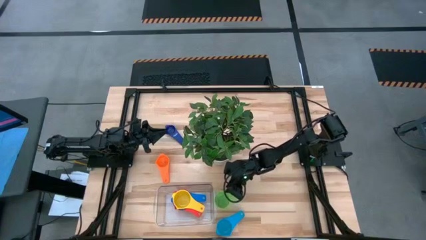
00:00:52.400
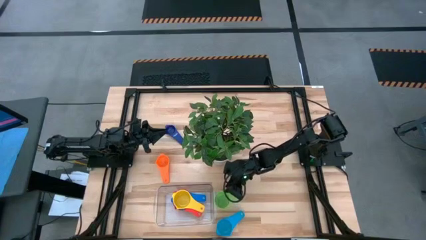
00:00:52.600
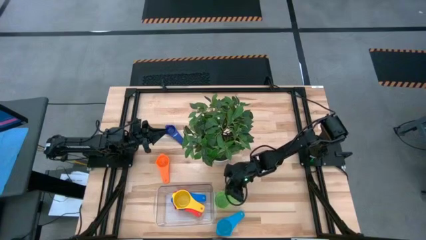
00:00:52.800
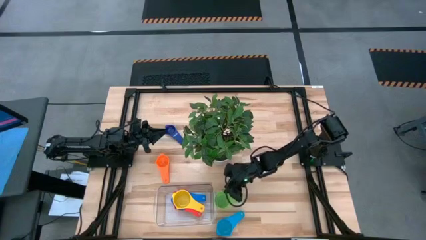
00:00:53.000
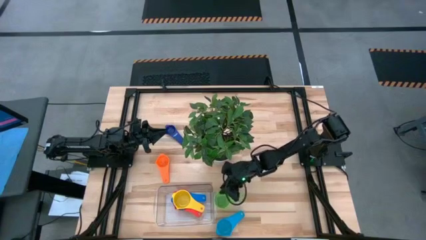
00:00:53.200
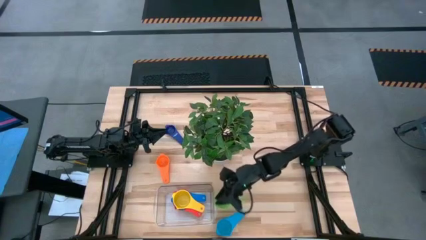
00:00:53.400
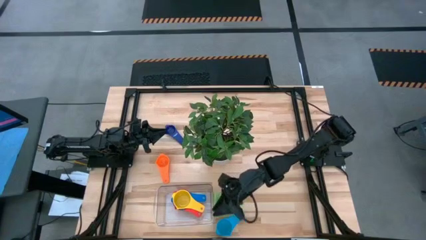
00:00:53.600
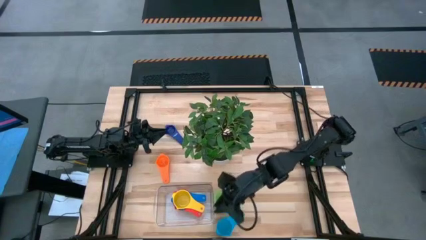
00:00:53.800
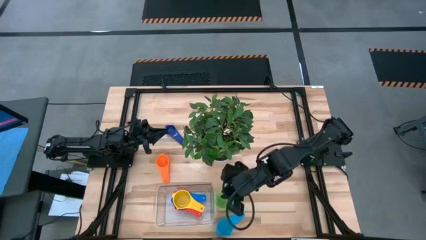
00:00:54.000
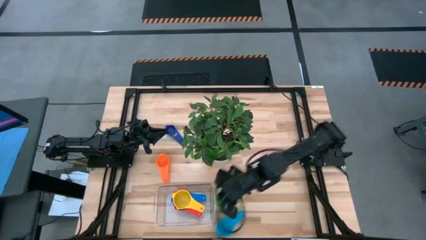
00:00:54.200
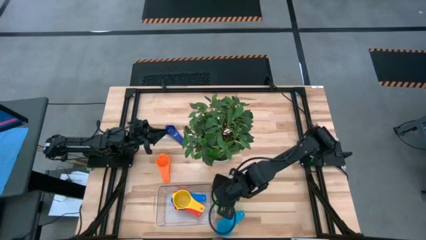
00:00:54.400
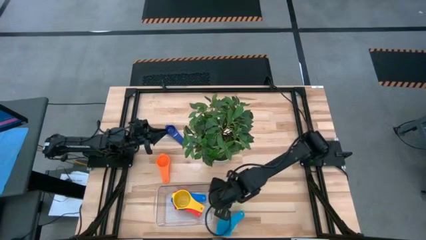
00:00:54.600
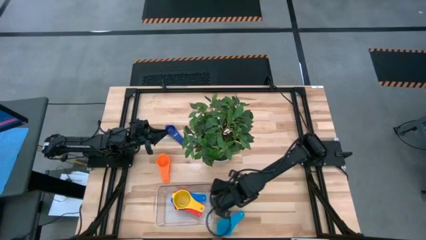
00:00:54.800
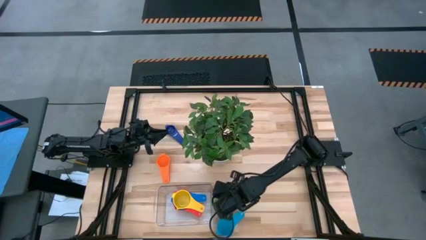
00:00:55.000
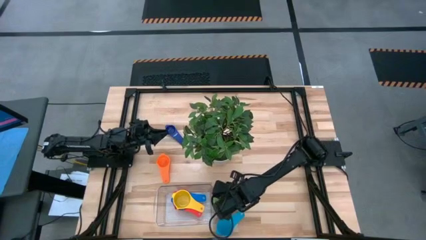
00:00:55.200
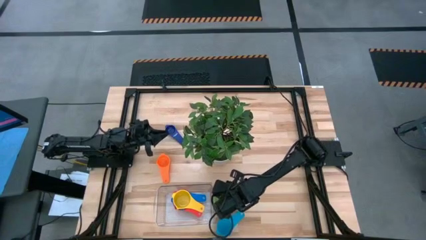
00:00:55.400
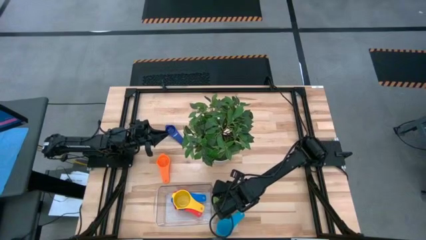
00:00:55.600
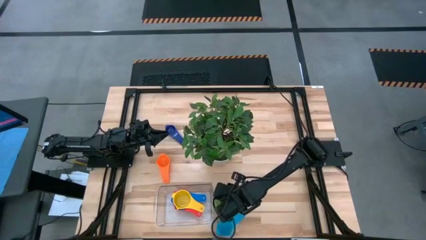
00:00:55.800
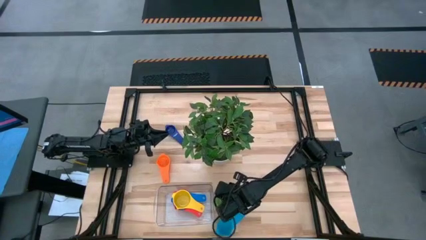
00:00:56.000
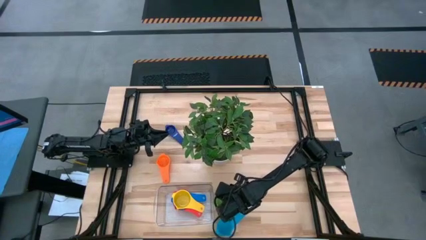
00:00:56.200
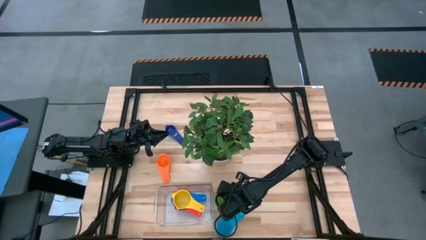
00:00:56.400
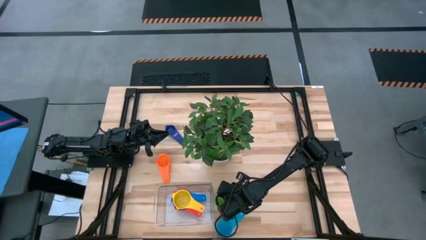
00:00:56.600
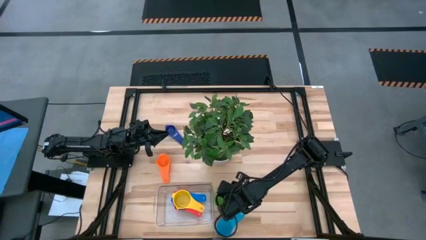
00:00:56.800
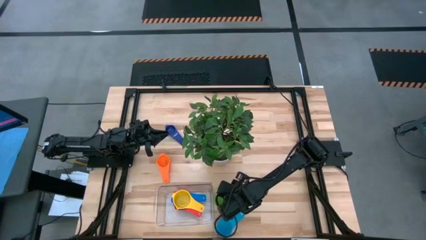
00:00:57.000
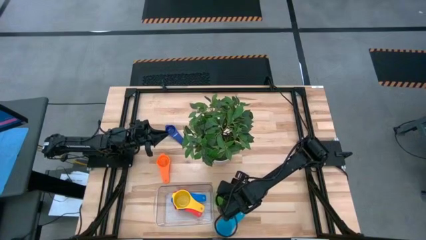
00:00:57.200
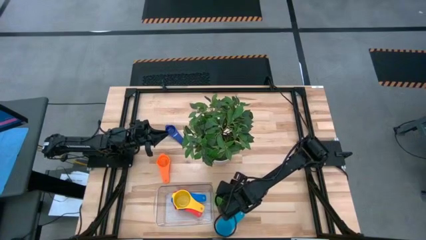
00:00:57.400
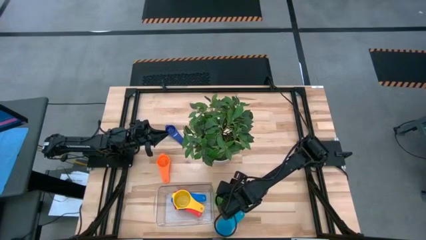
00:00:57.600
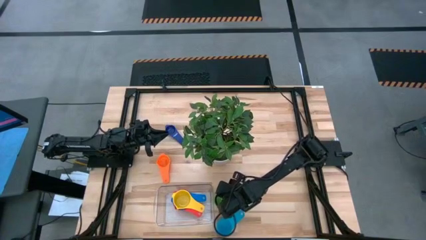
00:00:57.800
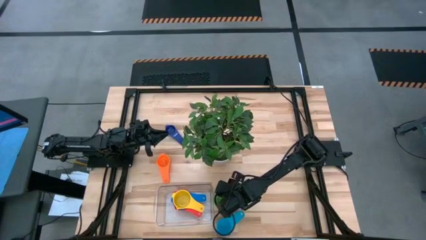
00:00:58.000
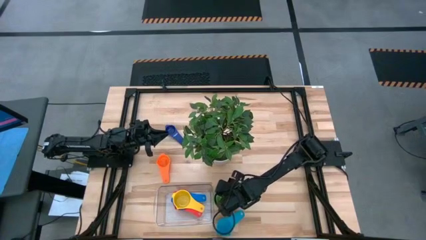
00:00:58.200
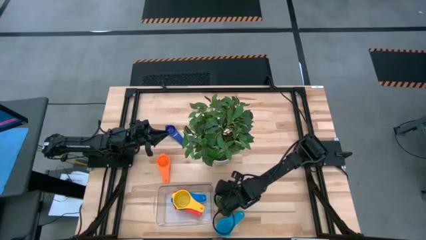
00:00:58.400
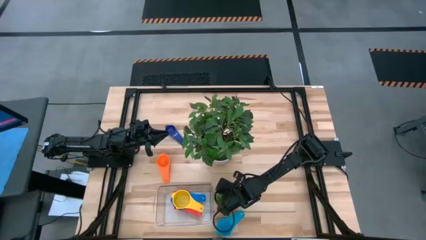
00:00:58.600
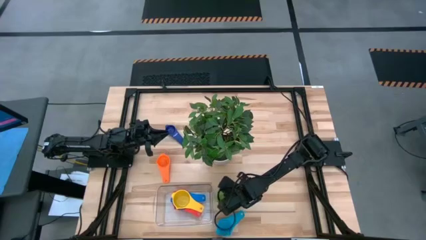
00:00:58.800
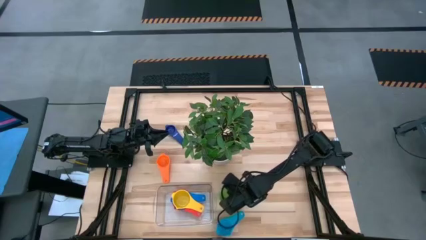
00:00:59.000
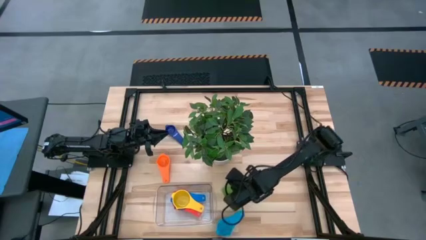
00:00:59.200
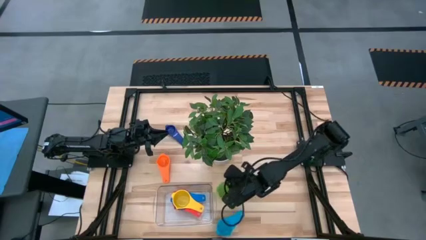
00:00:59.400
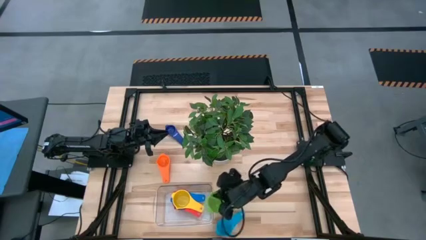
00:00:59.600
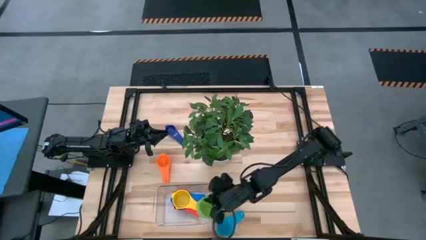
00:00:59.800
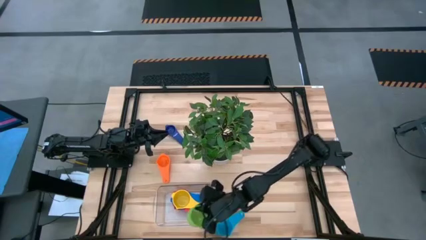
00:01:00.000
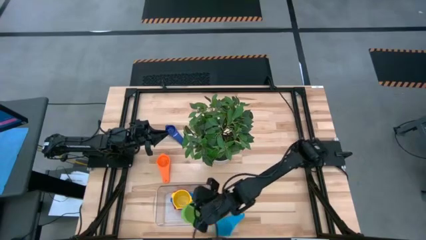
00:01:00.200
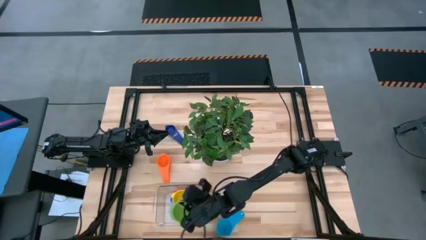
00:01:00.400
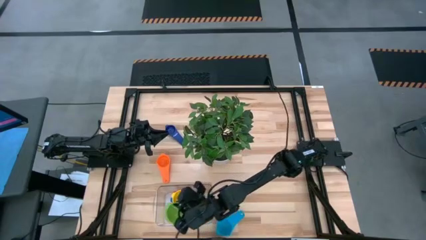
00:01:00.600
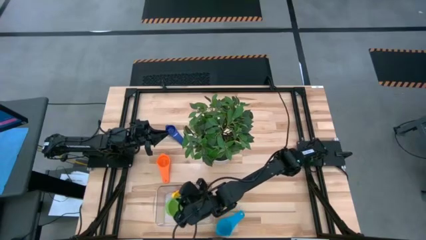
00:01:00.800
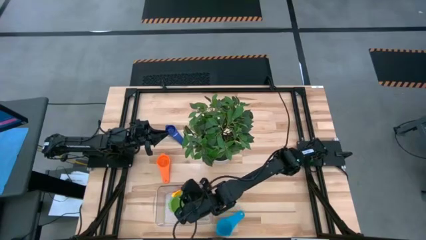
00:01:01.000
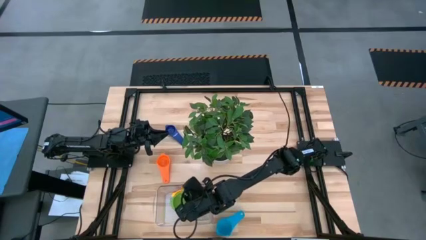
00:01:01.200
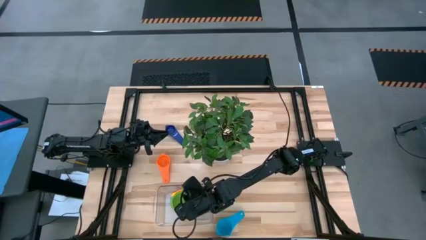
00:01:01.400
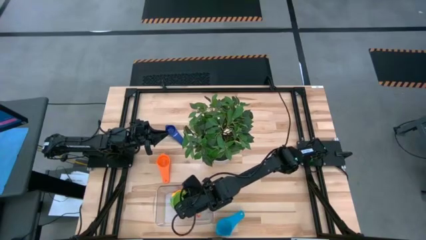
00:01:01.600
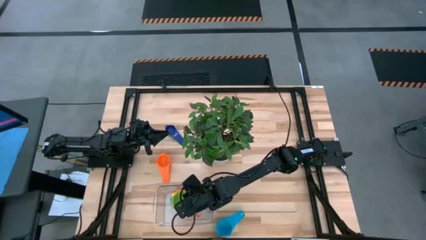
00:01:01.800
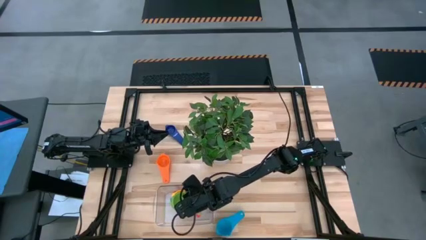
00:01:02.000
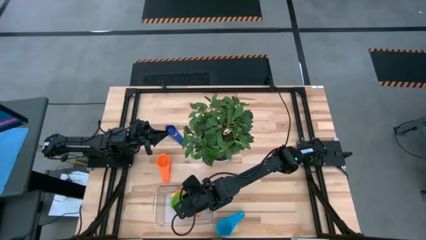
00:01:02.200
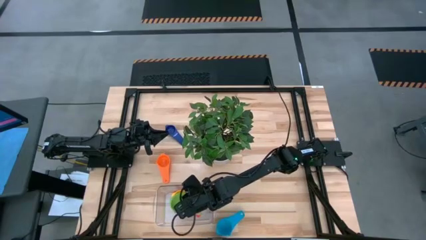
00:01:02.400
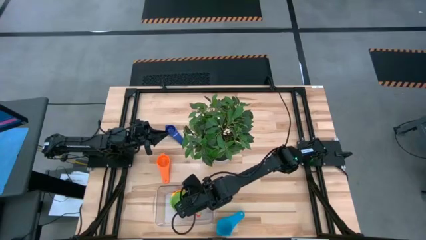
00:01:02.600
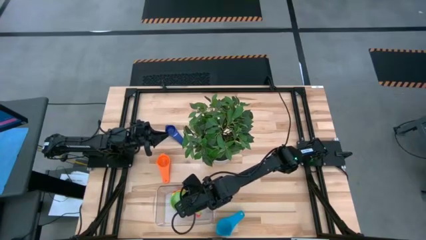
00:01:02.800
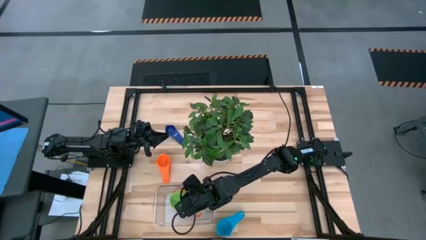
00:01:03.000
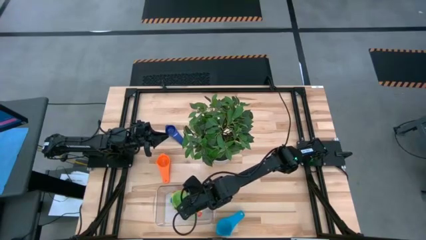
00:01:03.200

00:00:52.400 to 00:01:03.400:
Task: Nest measuring cups in basket
Stack the green measuring cup on the yellow measuring cup

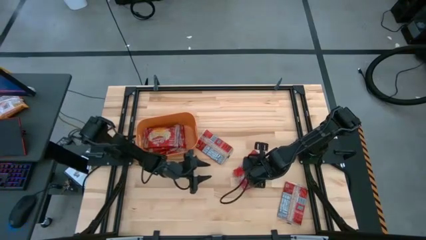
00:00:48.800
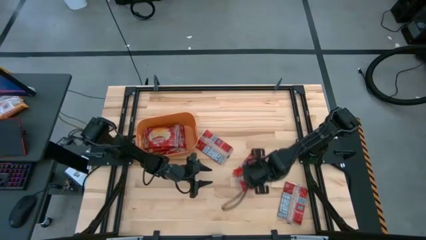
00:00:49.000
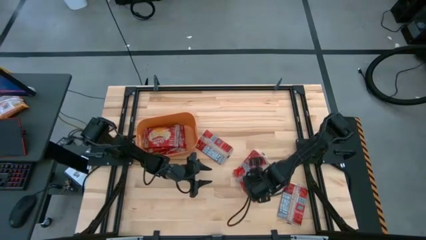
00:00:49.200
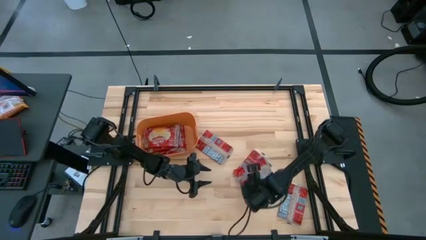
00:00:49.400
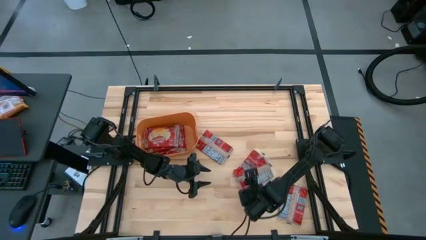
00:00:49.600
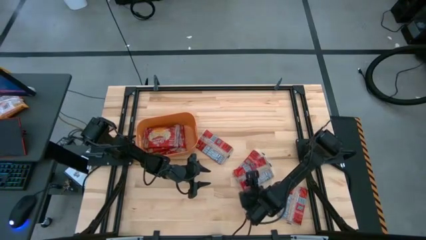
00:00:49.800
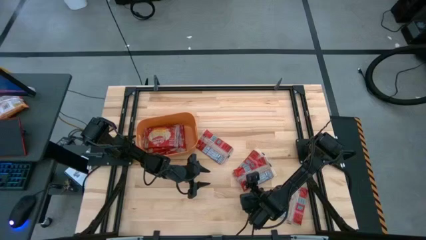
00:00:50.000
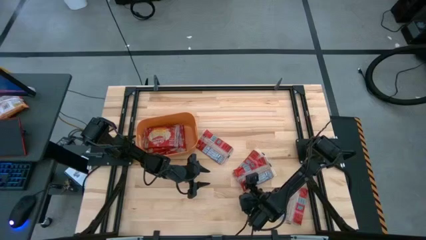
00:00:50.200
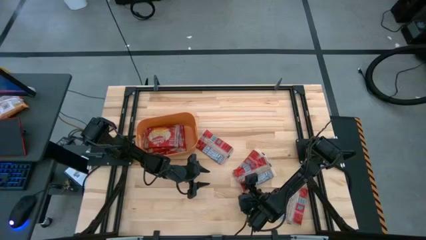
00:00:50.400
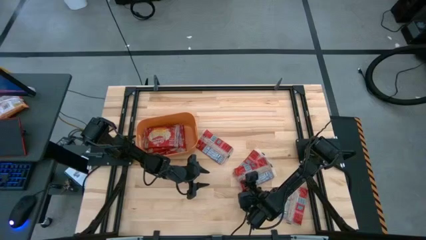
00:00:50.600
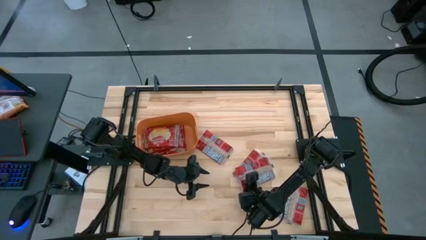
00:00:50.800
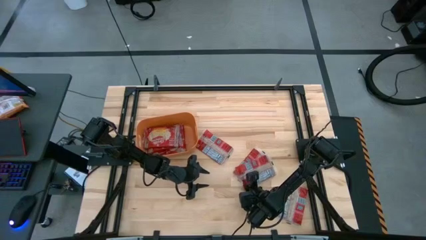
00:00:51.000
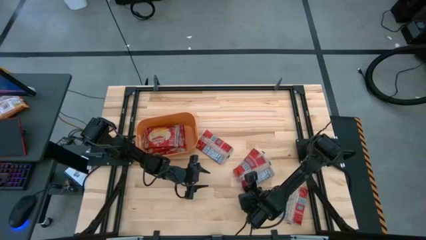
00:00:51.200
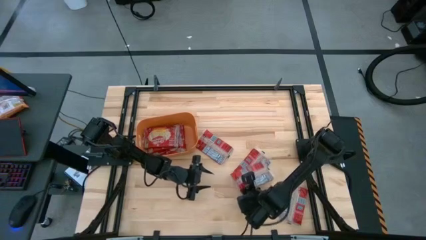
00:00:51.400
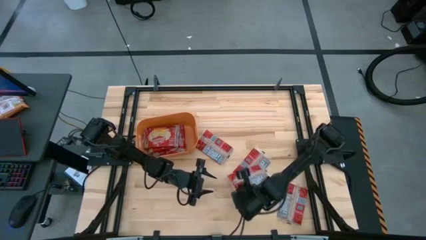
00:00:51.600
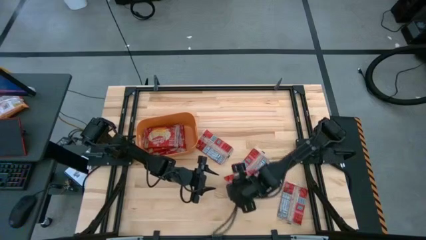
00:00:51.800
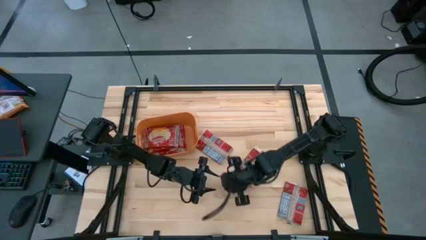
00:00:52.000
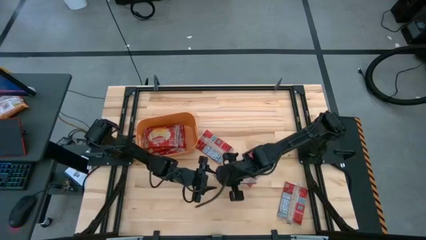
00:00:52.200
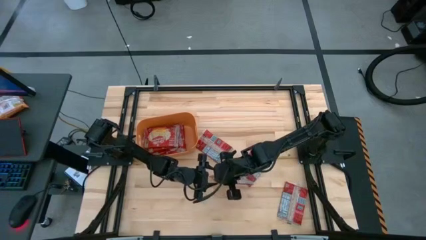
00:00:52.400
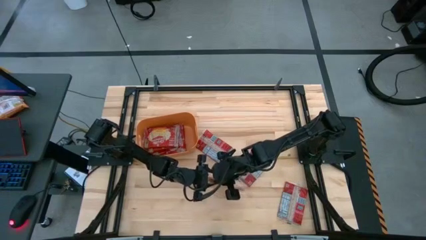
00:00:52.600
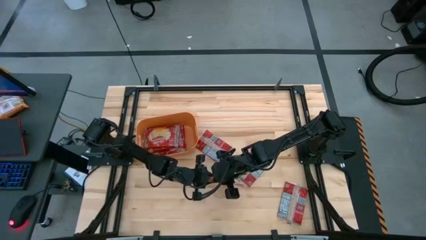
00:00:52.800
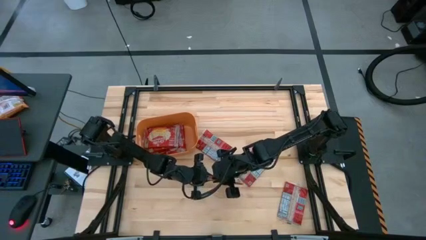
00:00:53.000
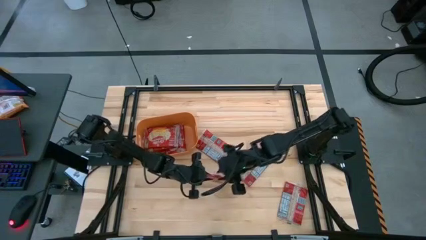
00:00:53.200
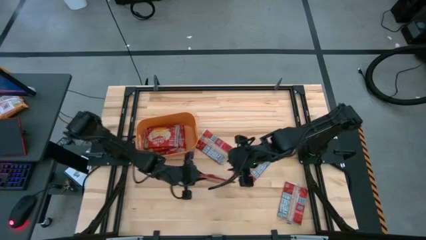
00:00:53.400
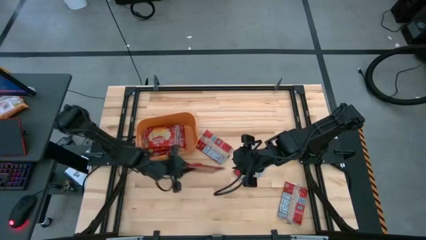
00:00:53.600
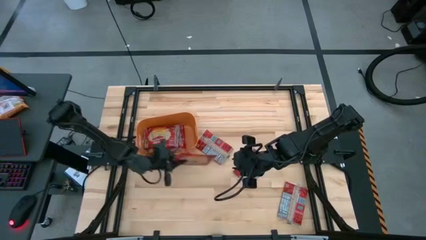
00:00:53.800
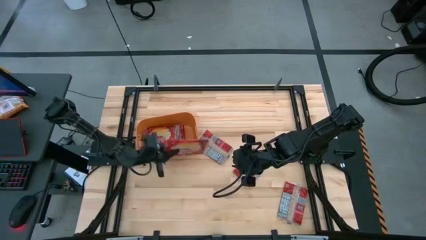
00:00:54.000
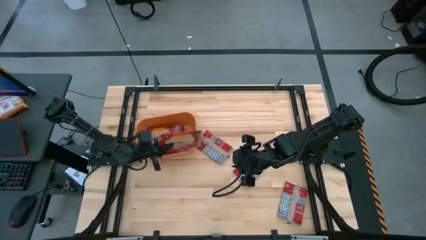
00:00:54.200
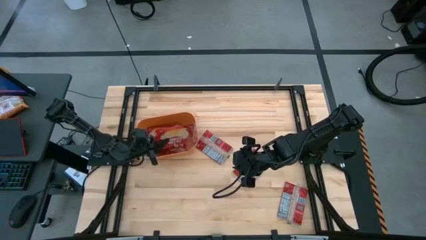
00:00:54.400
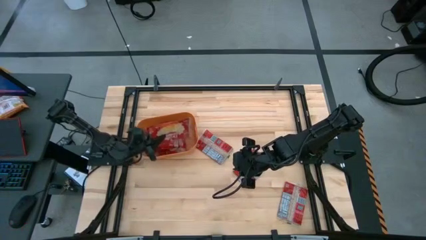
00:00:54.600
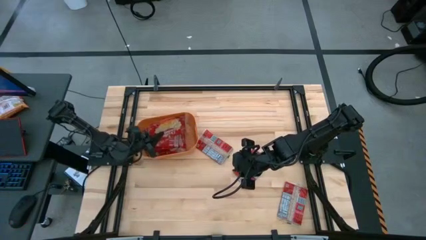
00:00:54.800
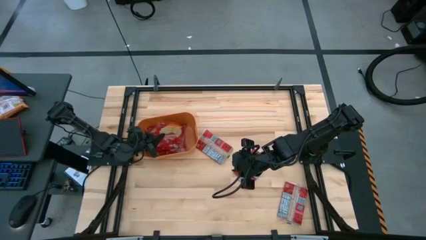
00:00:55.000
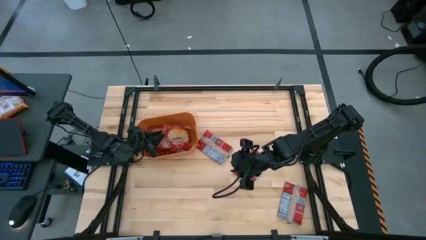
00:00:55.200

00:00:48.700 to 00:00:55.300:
Task: Sort popcorn bags into baskets
Put the red popcorn bag into the orange bin
